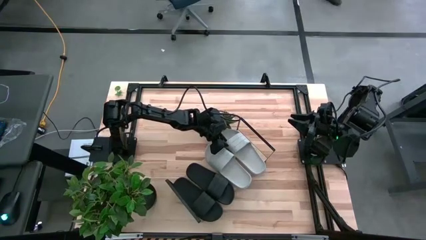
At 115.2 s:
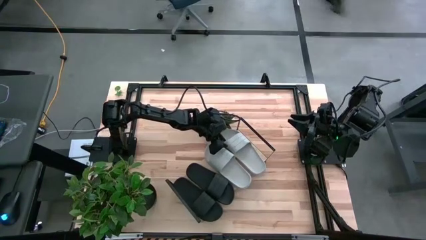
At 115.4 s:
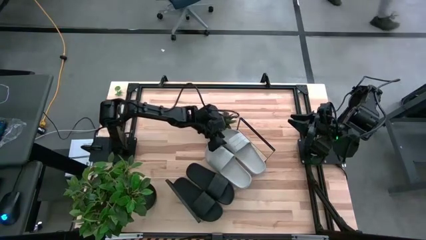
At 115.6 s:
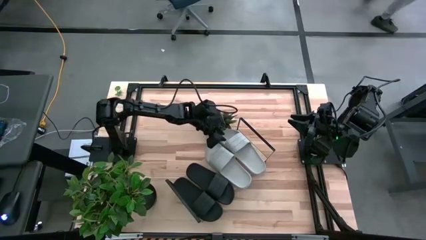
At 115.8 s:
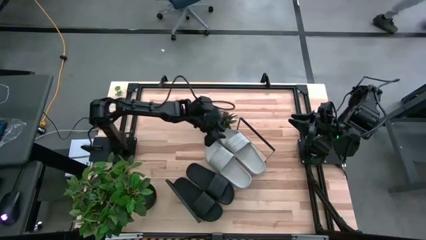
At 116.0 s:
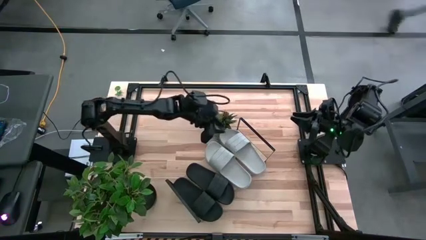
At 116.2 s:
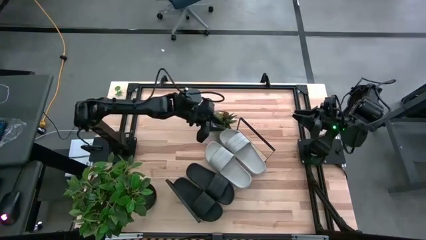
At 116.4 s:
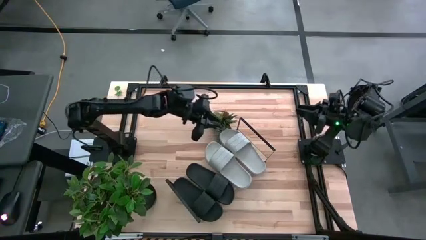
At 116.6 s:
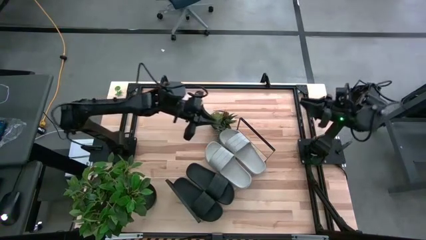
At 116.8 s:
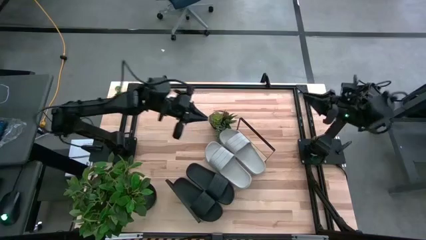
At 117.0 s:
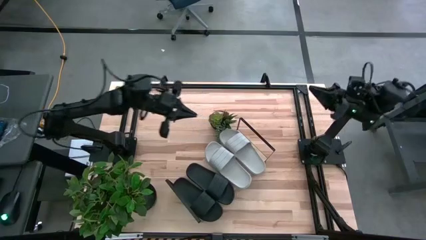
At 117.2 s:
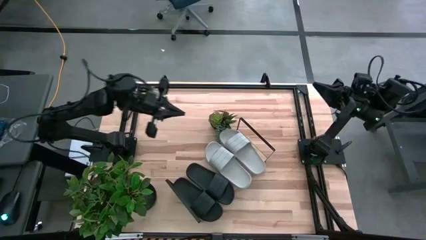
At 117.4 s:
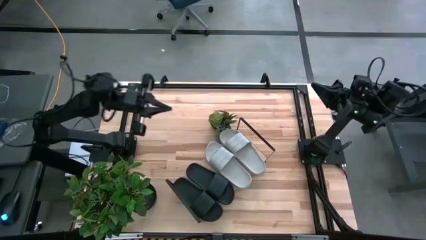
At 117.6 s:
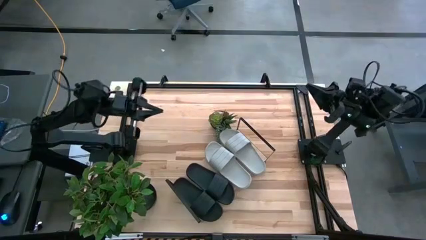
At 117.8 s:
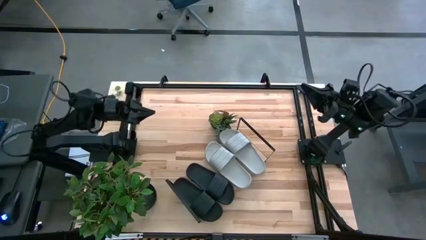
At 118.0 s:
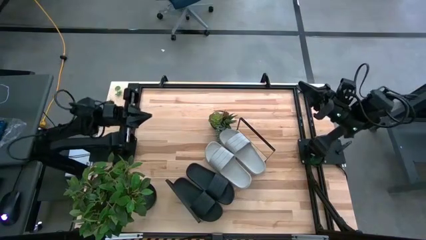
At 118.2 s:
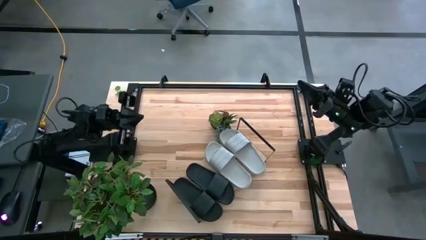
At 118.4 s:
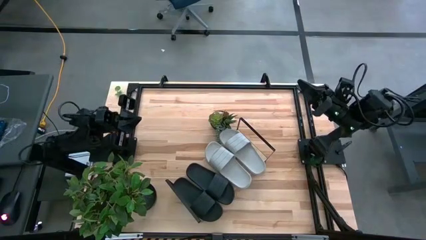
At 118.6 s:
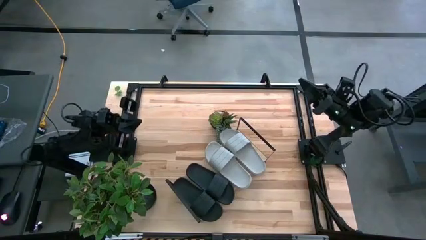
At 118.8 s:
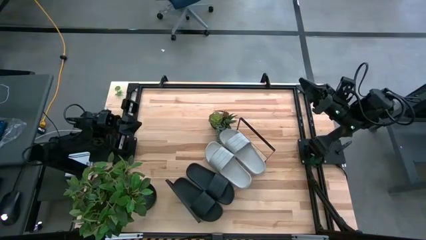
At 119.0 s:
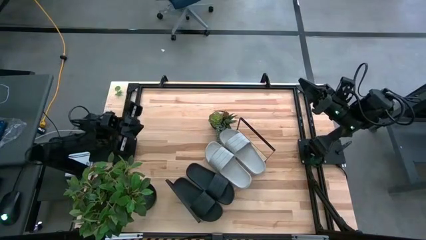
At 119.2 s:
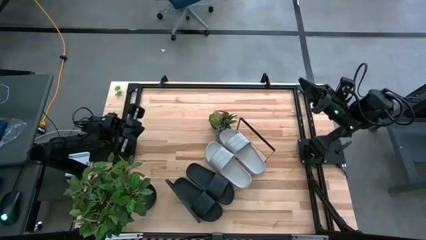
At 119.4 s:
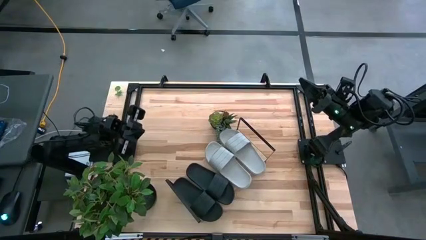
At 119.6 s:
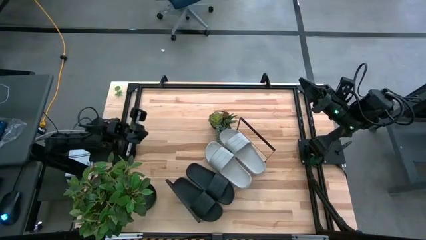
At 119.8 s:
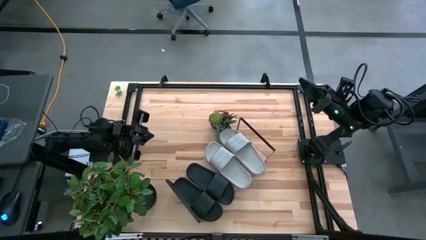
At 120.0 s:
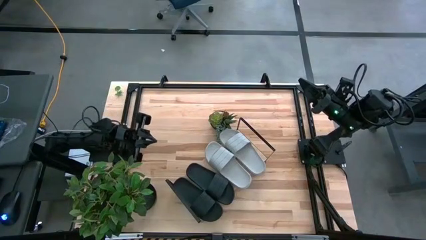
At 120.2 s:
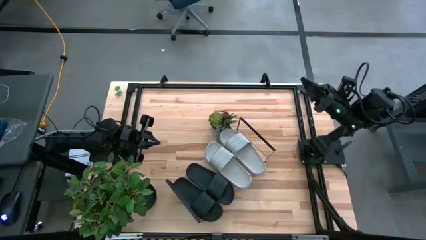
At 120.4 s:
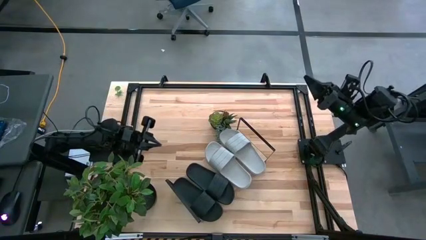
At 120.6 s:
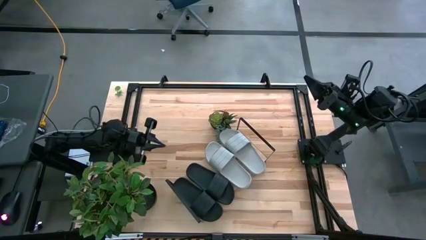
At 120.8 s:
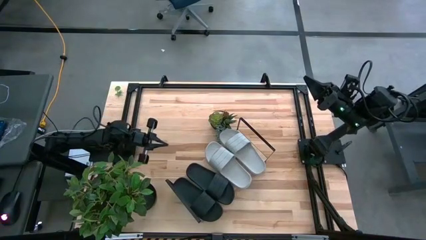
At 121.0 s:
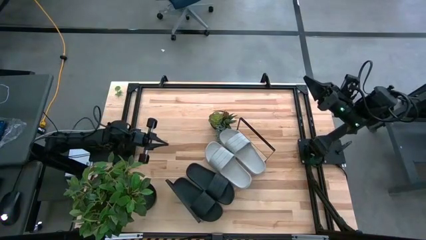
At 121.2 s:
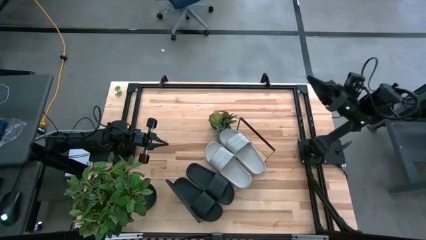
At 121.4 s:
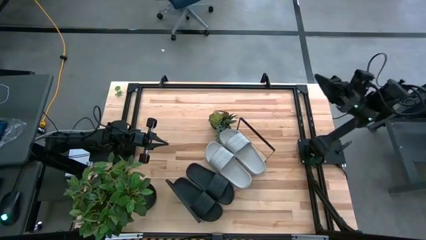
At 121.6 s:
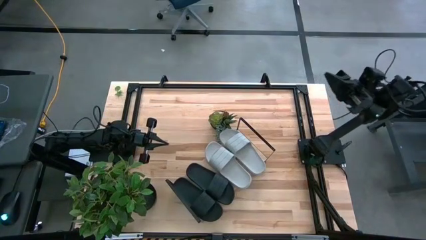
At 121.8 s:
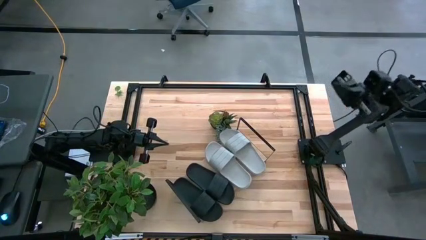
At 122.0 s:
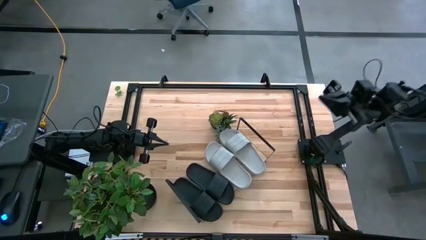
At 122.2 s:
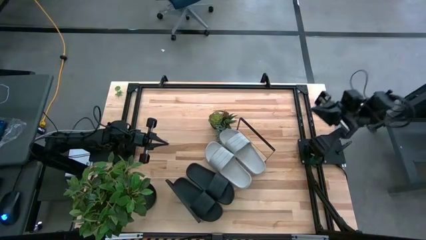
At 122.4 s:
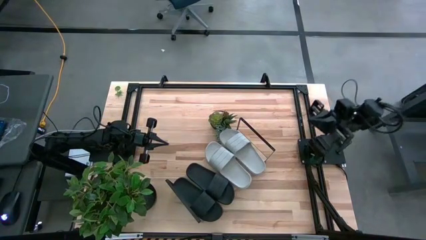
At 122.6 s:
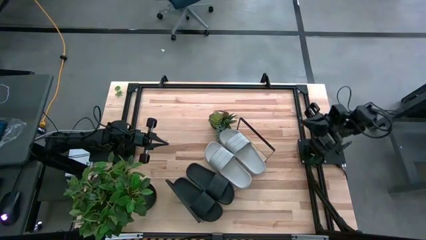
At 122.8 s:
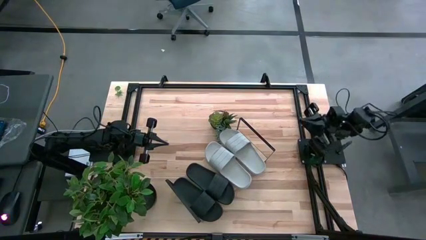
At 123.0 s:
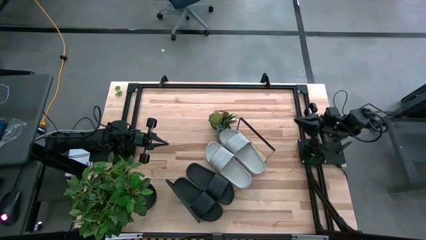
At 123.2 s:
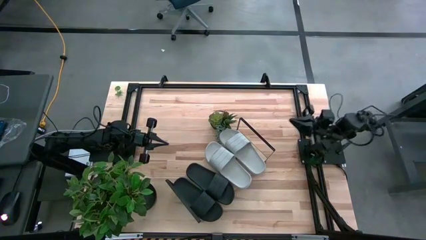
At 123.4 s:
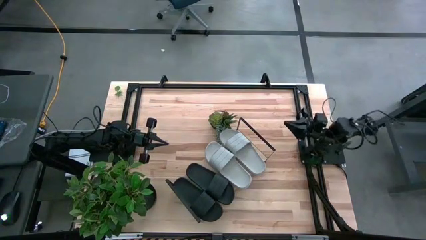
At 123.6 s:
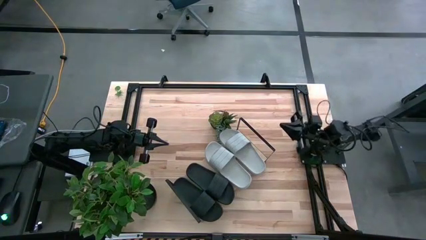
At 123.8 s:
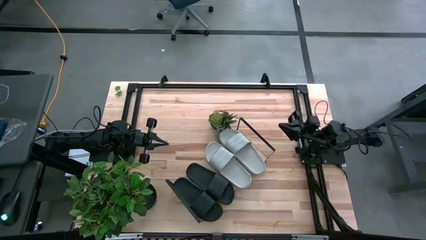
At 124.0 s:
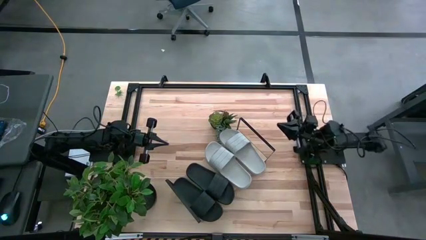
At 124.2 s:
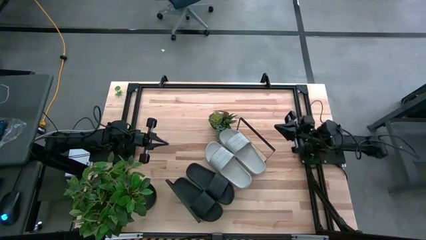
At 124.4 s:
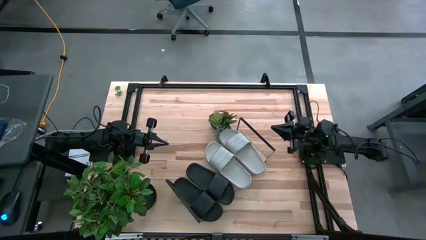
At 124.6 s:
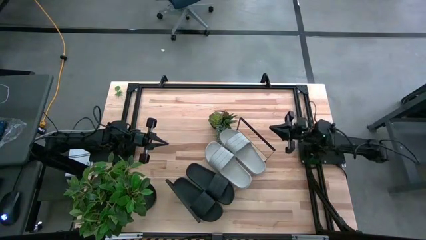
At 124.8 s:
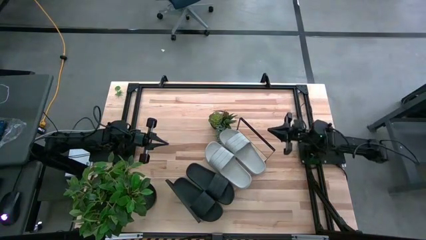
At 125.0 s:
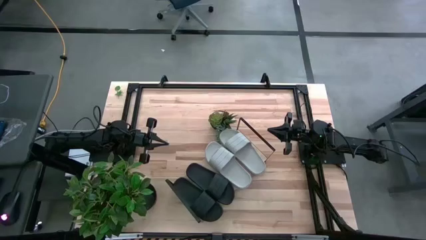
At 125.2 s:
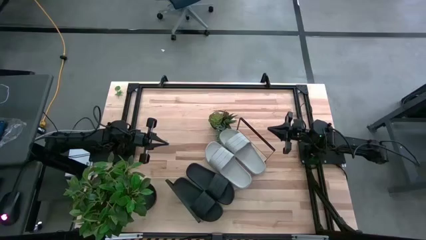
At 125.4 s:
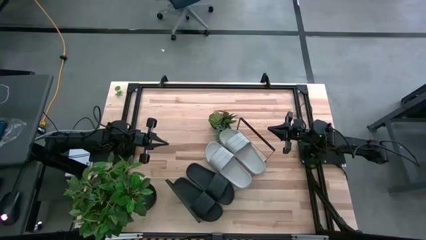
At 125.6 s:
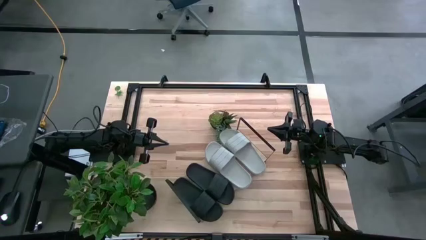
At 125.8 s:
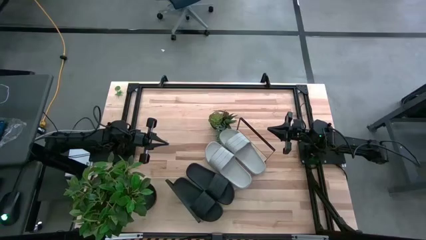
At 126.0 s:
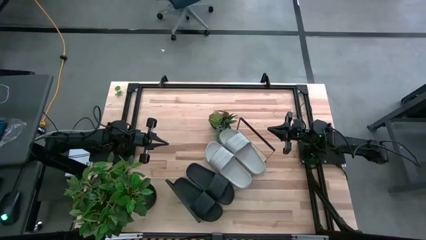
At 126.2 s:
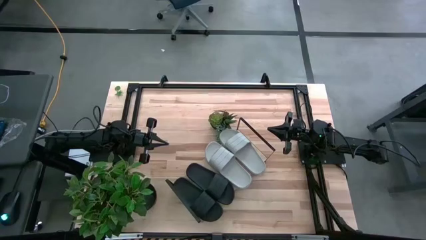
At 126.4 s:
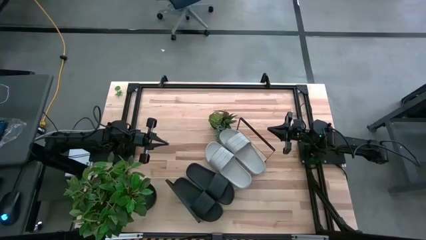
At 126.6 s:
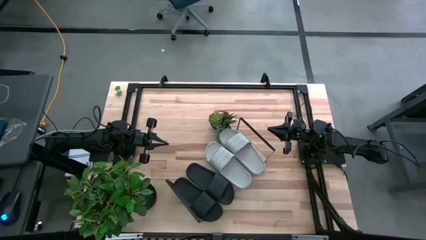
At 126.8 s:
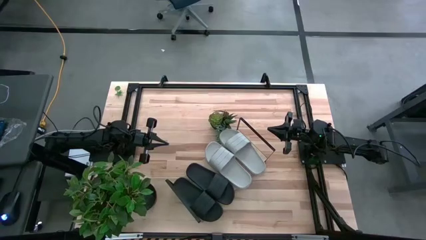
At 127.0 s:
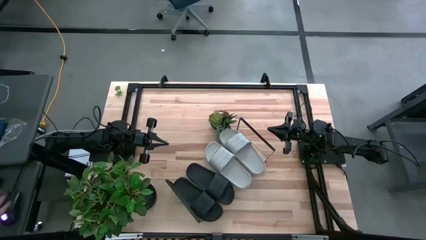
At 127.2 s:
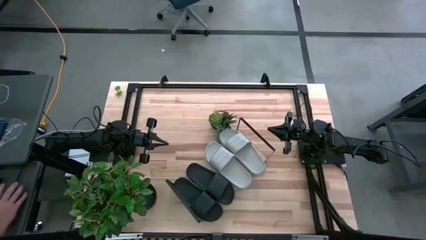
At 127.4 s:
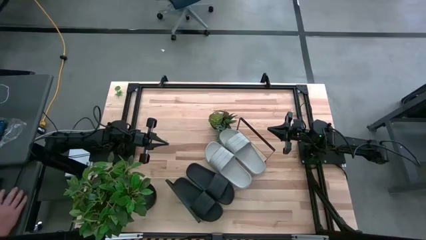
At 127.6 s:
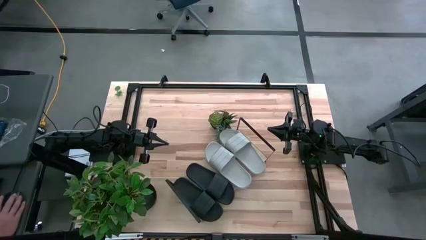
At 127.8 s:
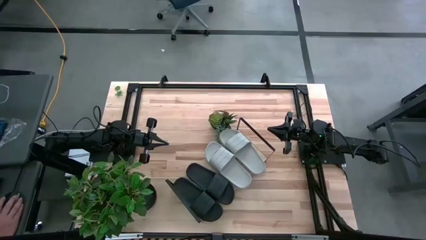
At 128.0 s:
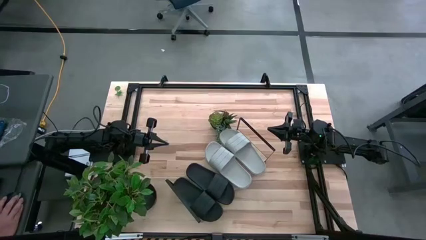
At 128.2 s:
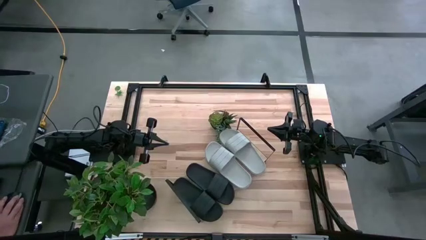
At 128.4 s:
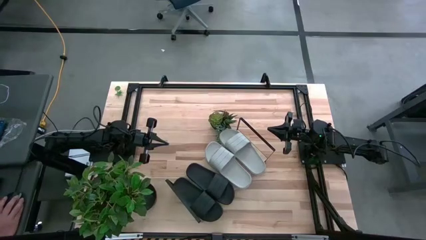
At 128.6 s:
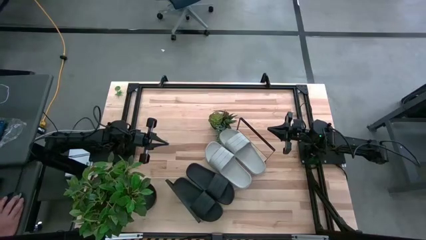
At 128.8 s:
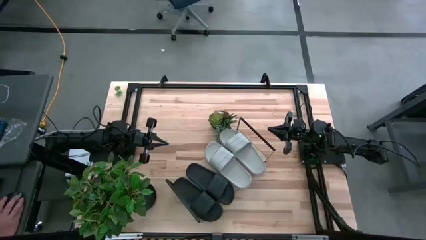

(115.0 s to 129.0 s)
Task: Pick and place slides into the shelf
Return to Home Position
